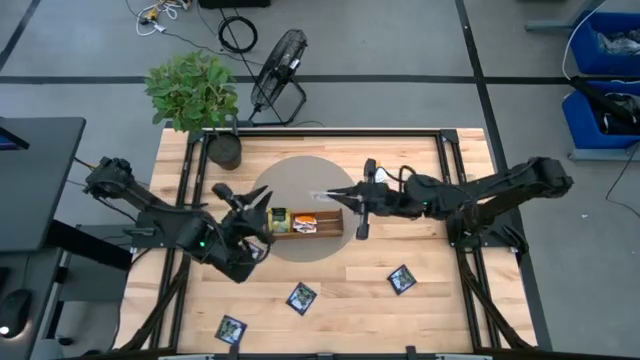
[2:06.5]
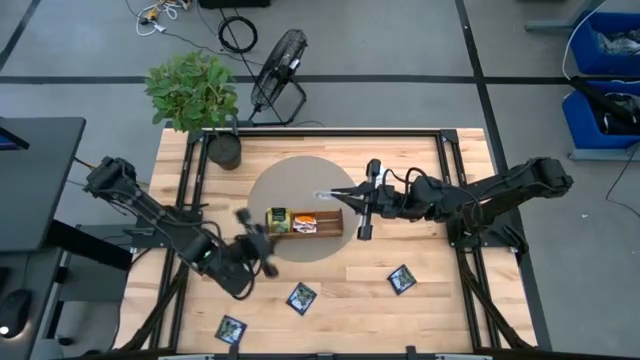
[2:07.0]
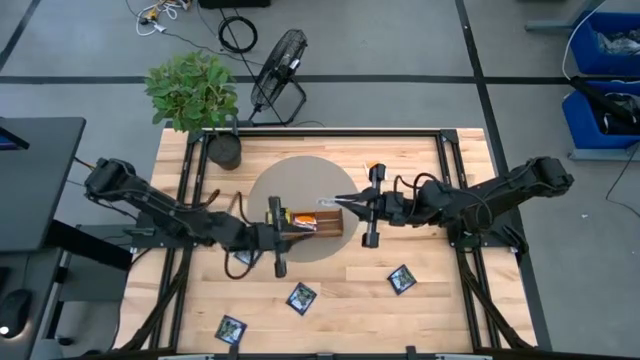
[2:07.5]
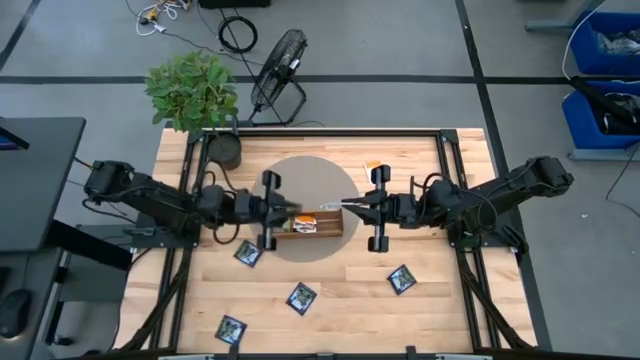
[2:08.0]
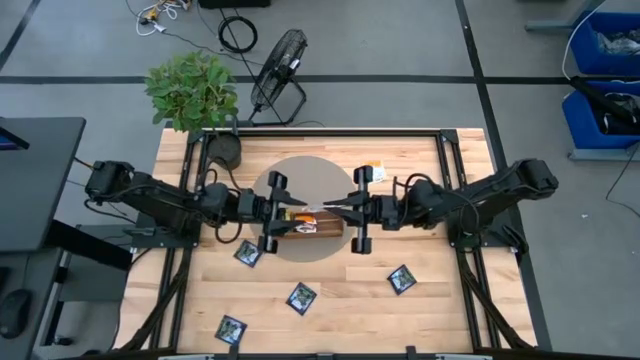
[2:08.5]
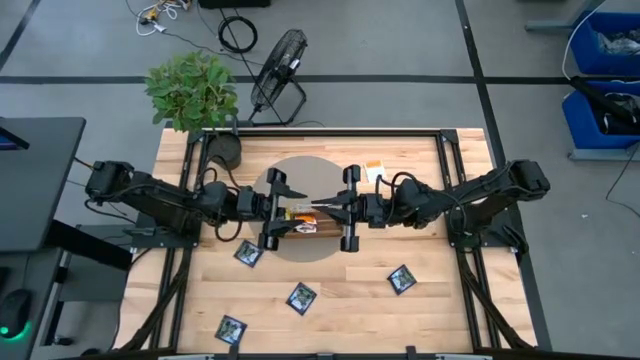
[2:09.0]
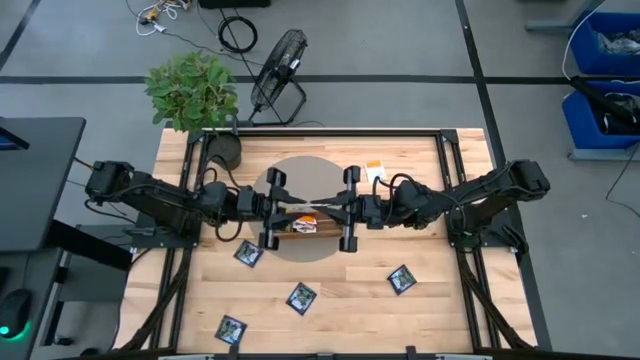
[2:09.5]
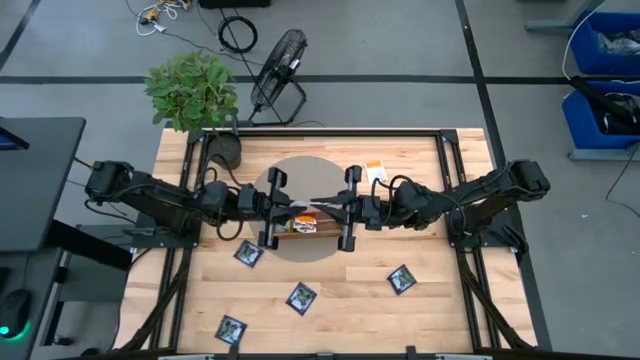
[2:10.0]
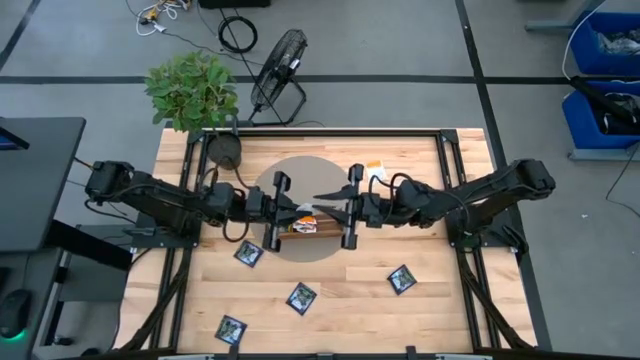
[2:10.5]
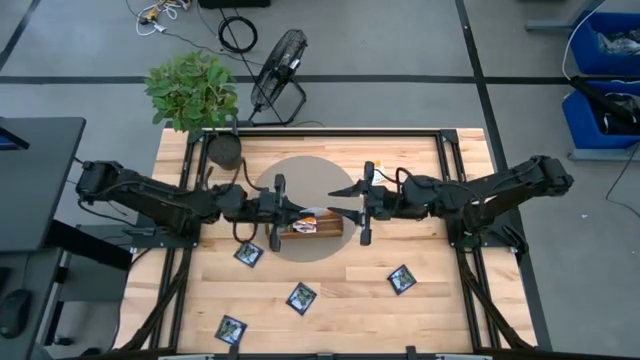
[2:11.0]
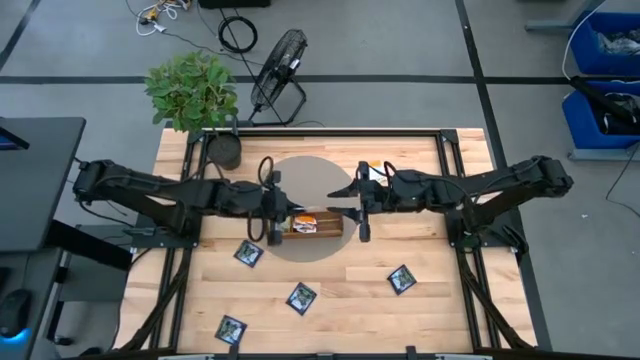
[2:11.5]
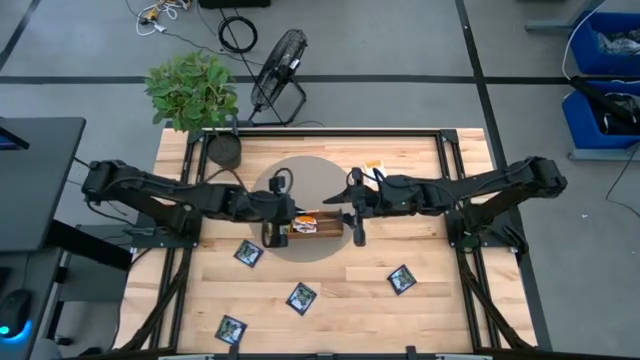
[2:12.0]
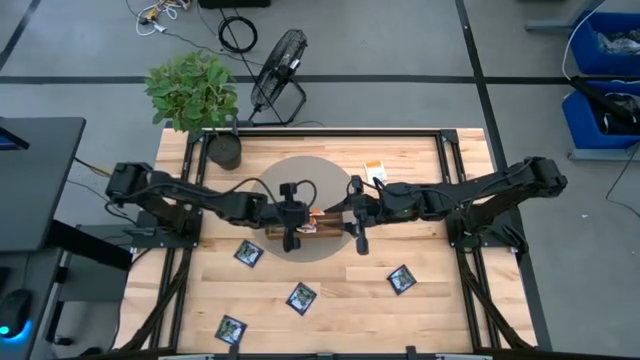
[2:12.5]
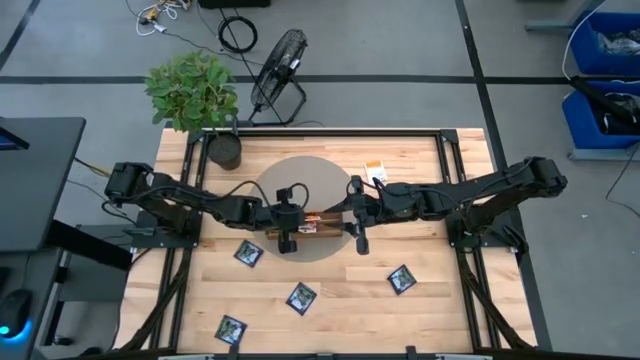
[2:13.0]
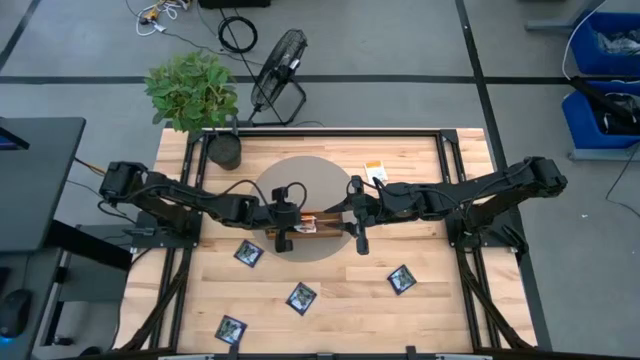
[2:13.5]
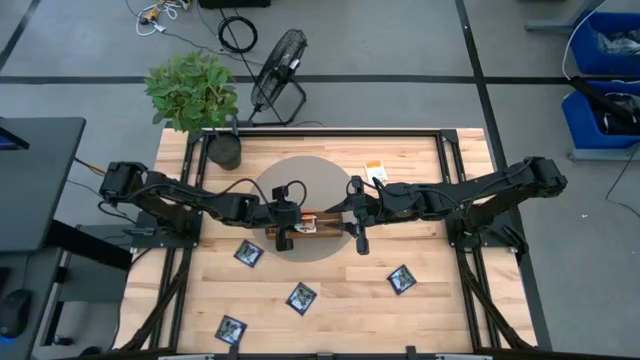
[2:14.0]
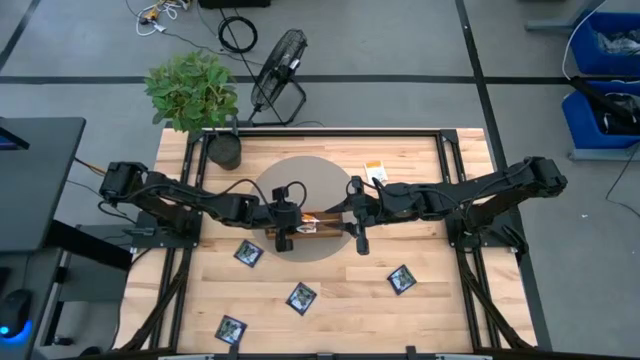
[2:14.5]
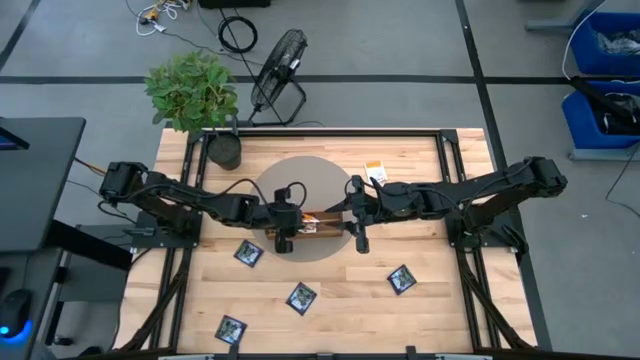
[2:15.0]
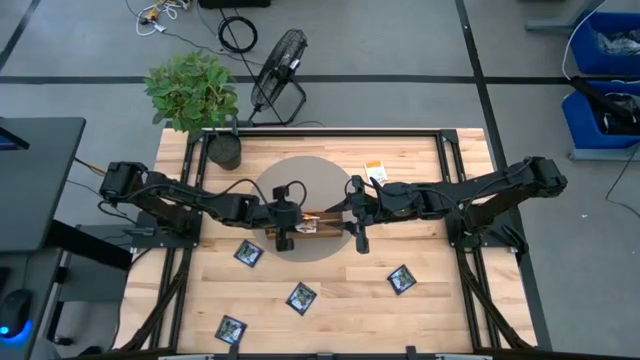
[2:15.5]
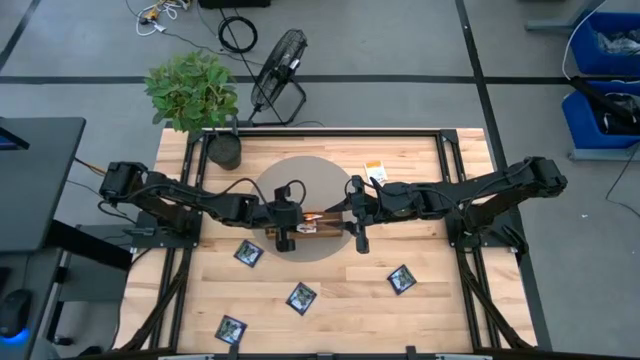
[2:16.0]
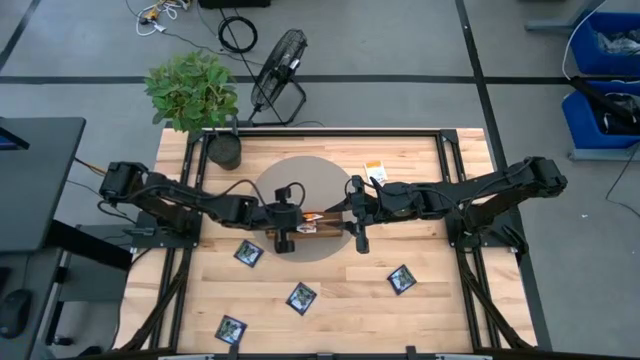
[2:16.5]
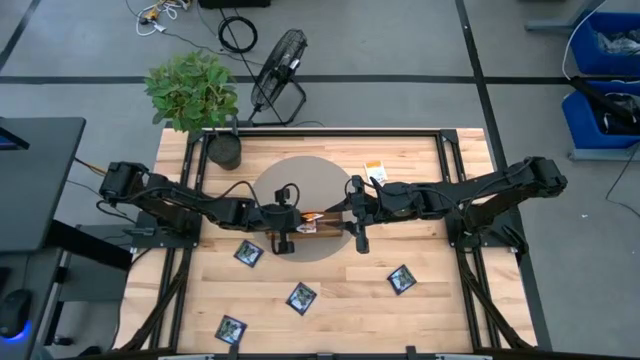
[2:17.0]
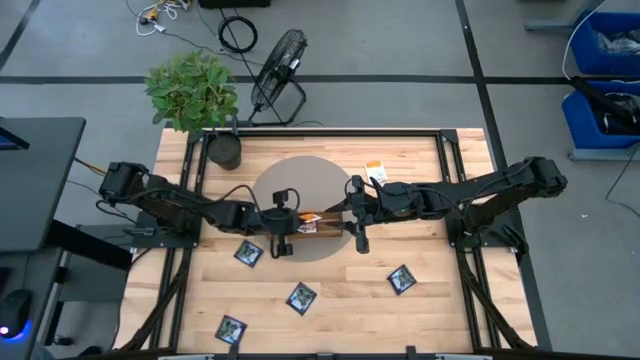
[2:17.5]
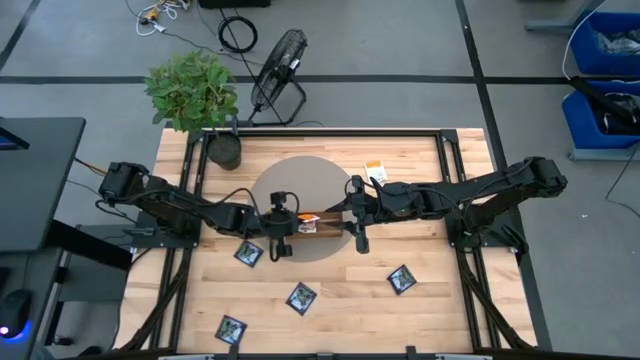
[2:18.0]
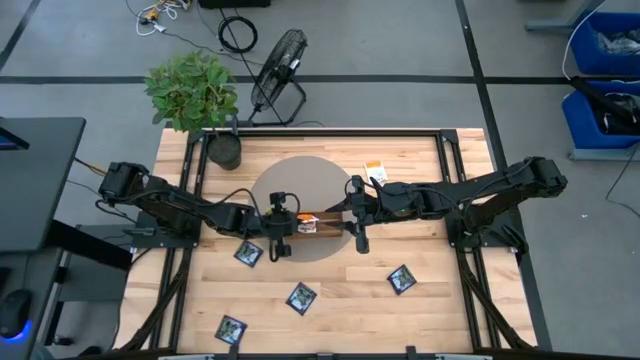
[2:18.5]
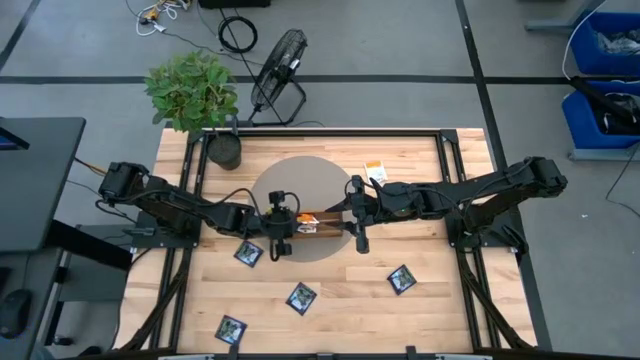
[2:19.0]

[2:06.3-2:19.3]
Task: Pick & Place Tea
Put the bottom orange tea bag into the wooden organizer
